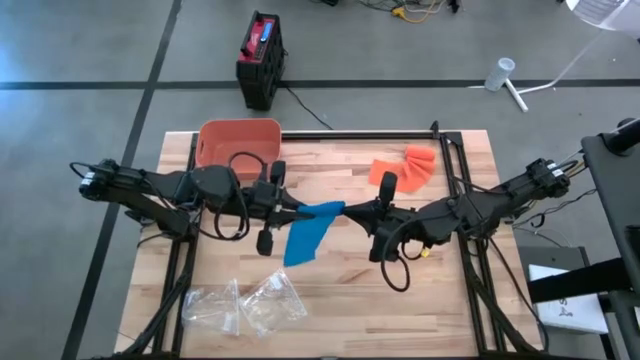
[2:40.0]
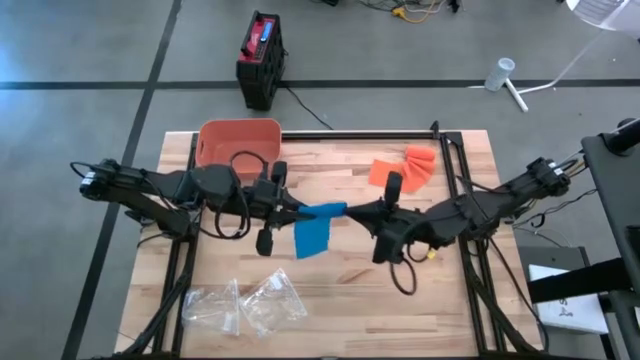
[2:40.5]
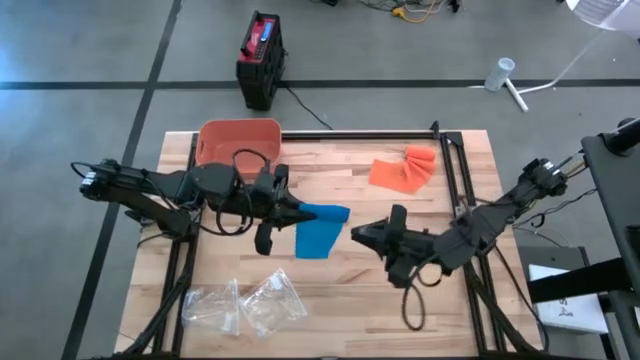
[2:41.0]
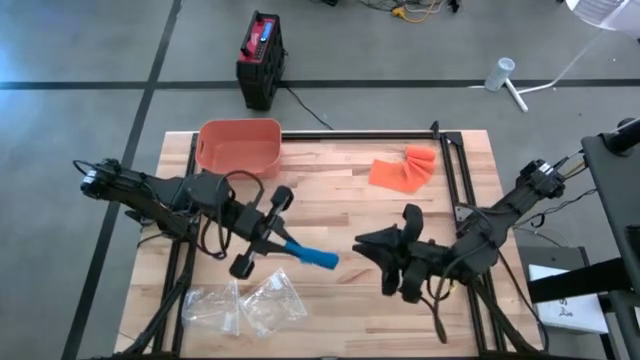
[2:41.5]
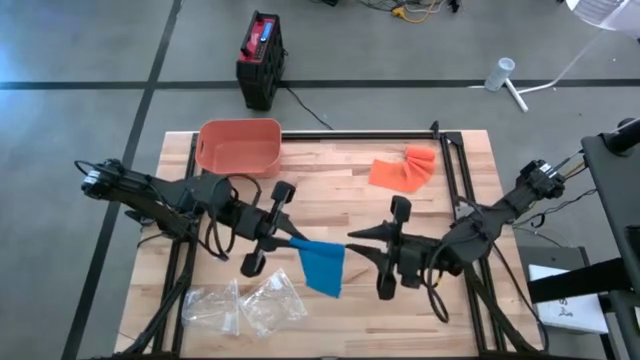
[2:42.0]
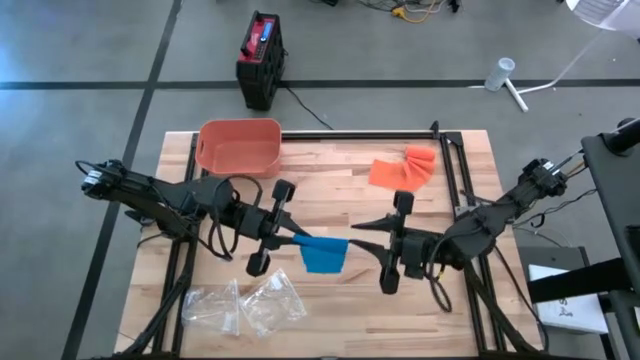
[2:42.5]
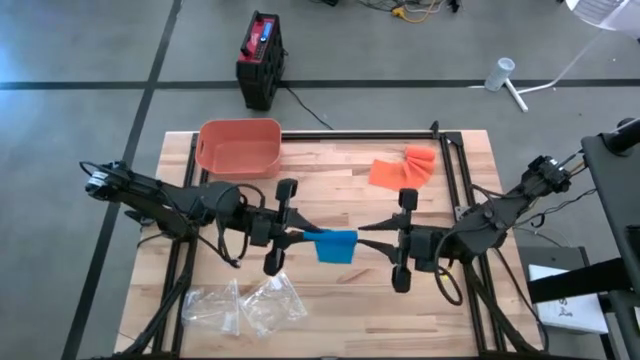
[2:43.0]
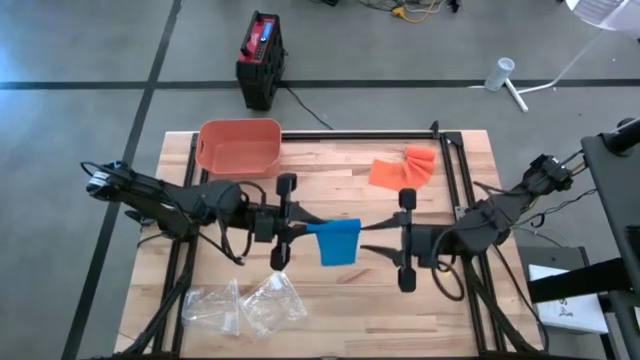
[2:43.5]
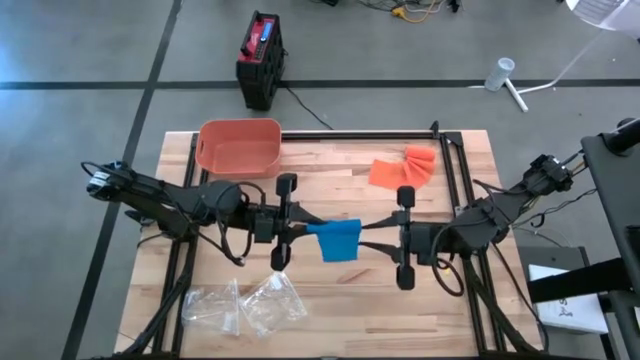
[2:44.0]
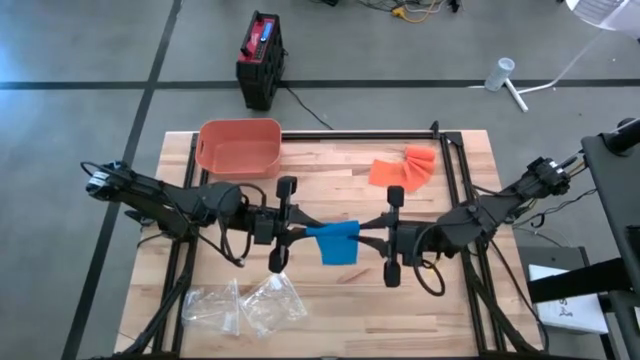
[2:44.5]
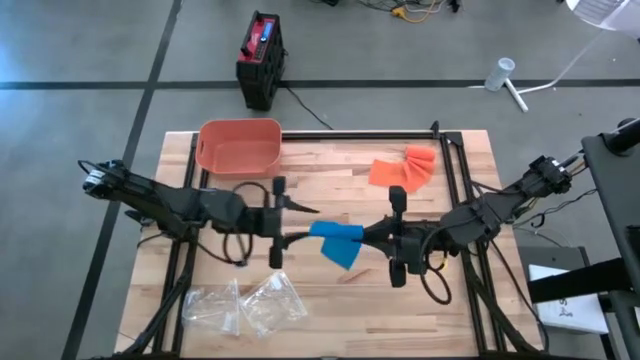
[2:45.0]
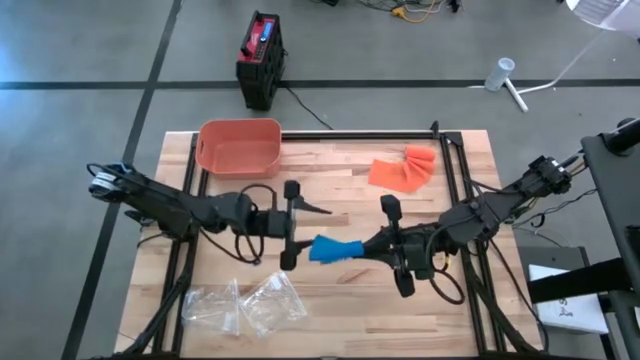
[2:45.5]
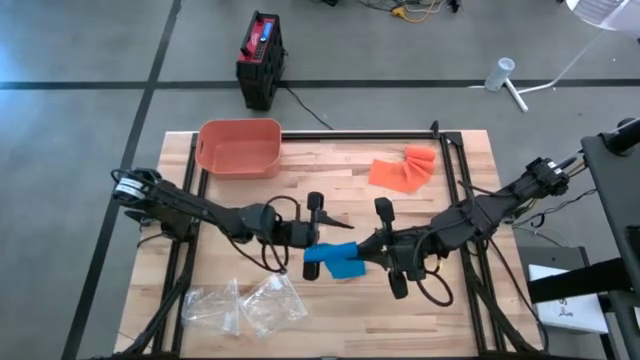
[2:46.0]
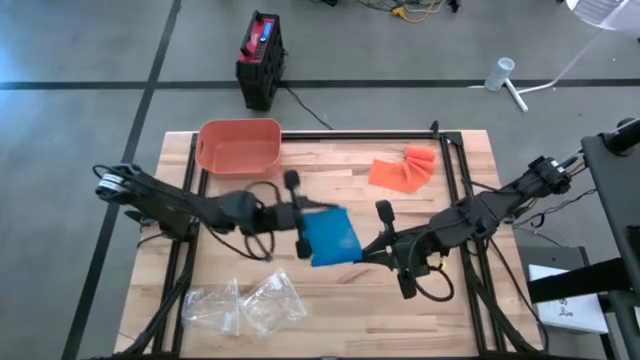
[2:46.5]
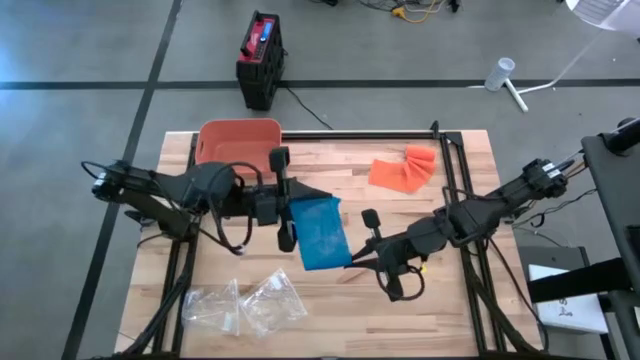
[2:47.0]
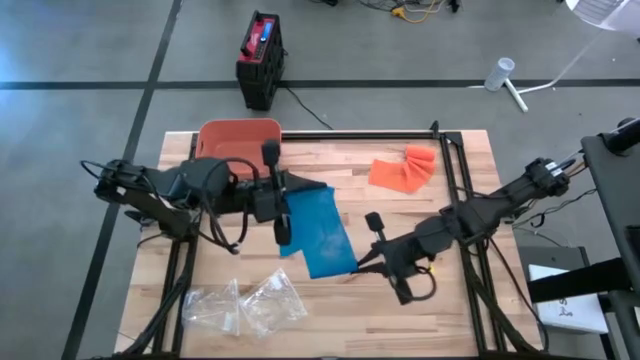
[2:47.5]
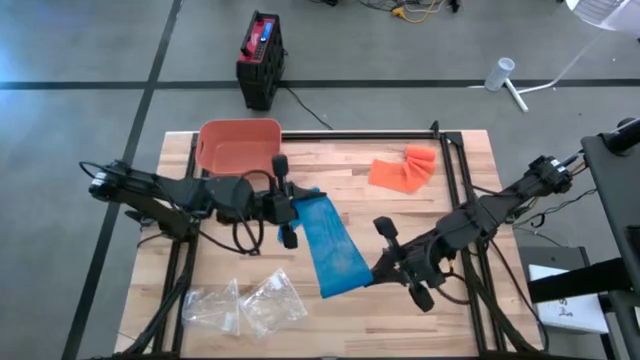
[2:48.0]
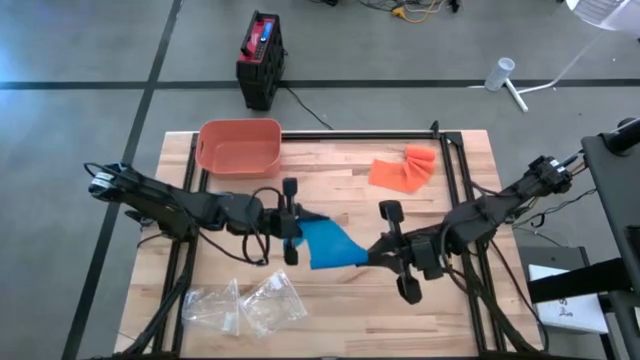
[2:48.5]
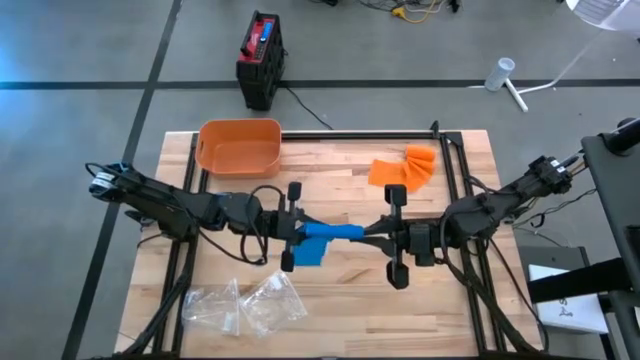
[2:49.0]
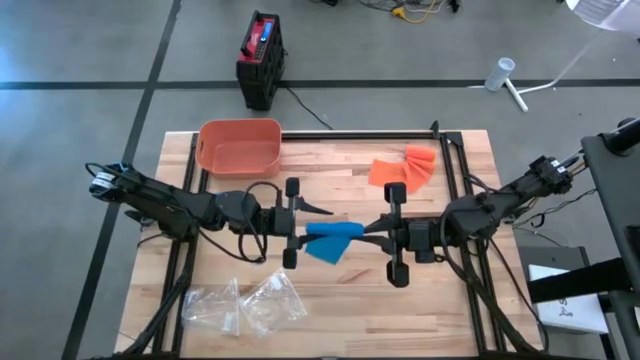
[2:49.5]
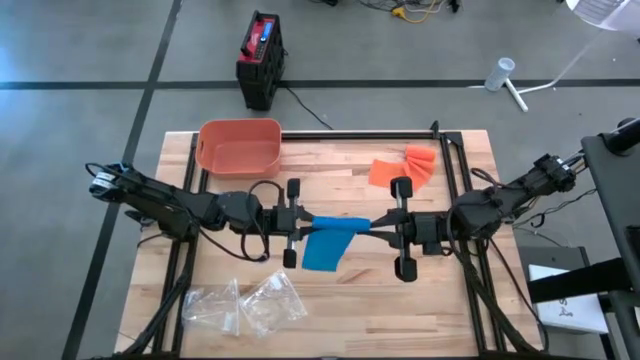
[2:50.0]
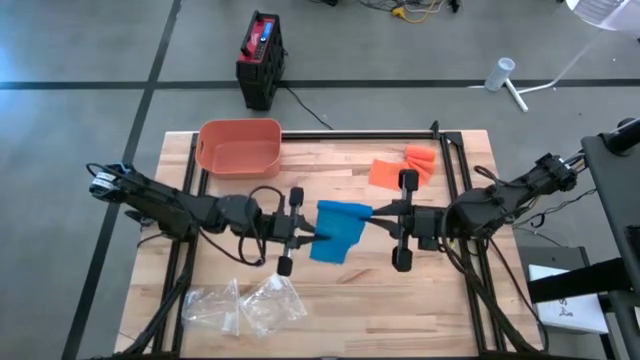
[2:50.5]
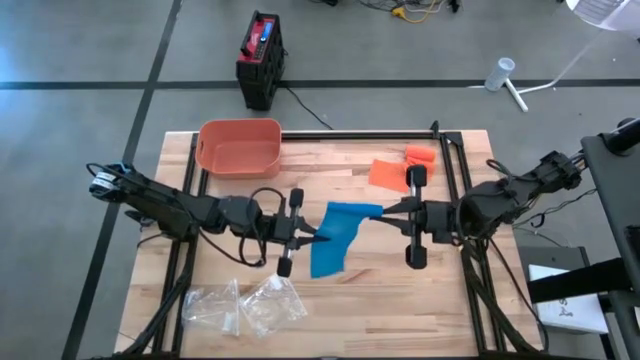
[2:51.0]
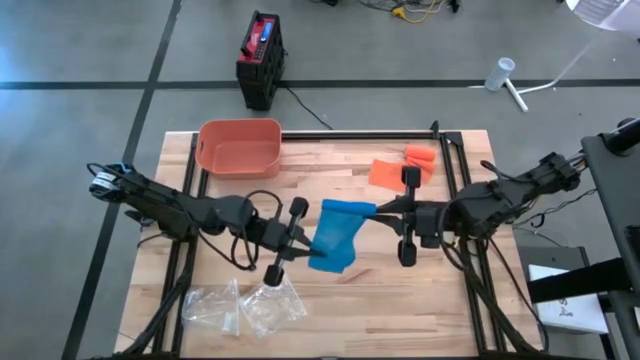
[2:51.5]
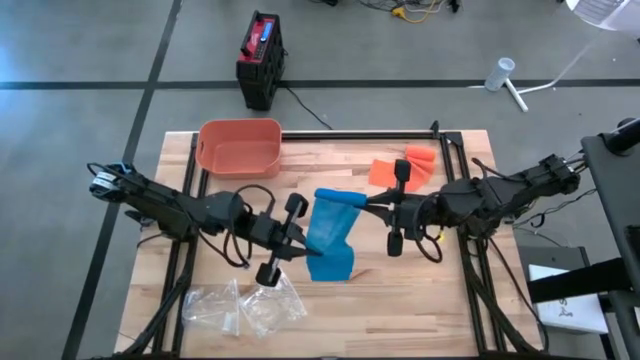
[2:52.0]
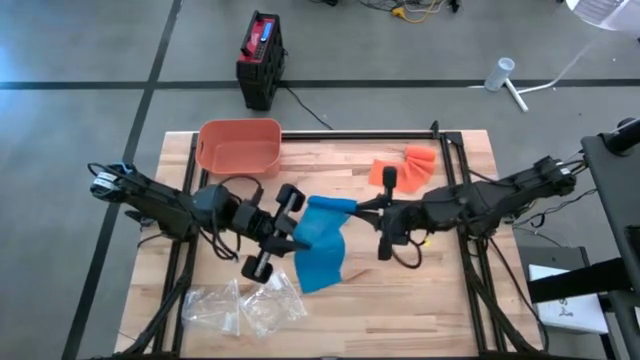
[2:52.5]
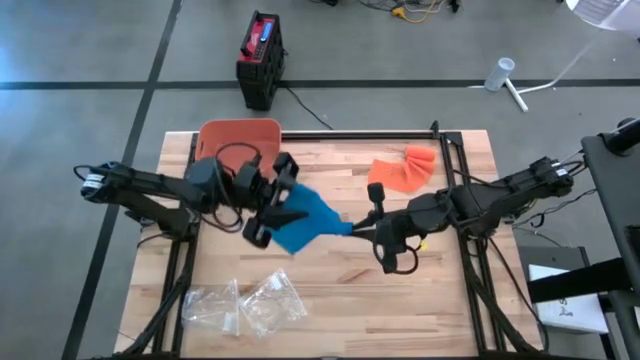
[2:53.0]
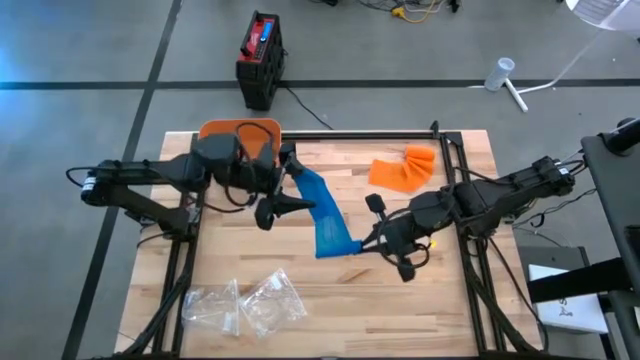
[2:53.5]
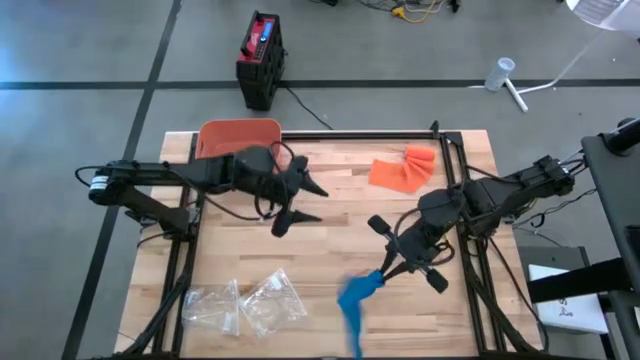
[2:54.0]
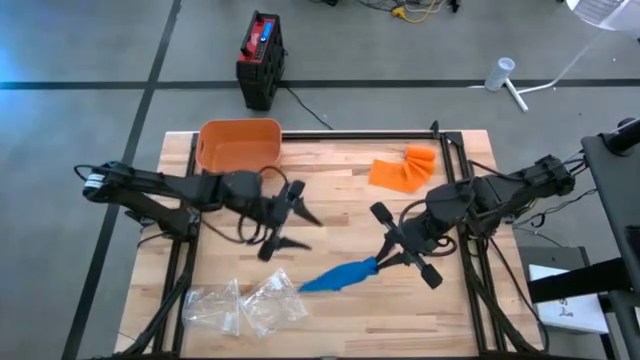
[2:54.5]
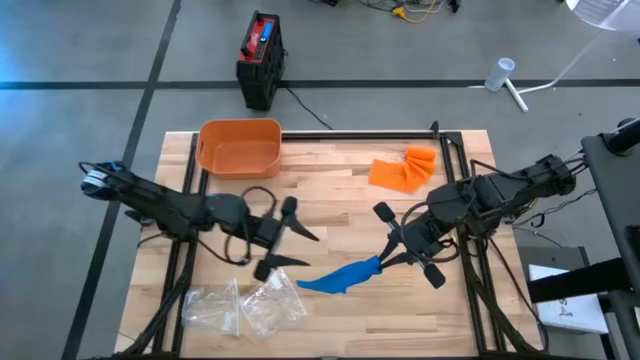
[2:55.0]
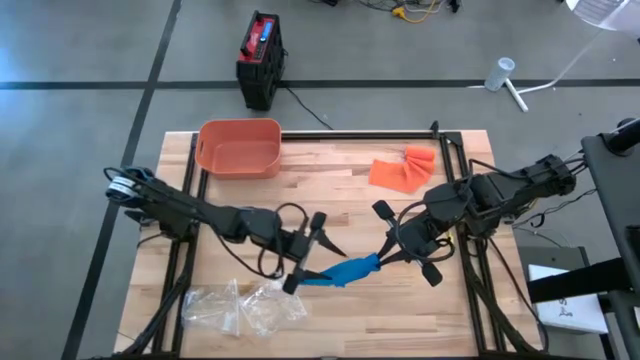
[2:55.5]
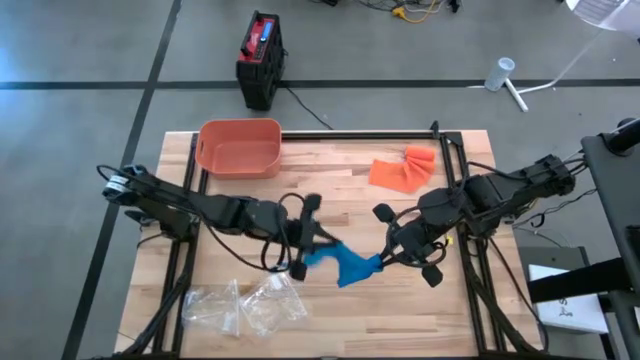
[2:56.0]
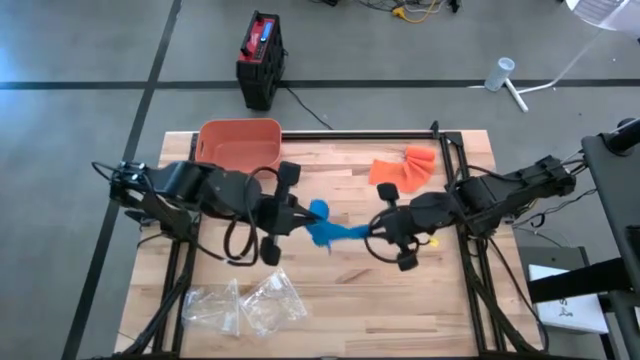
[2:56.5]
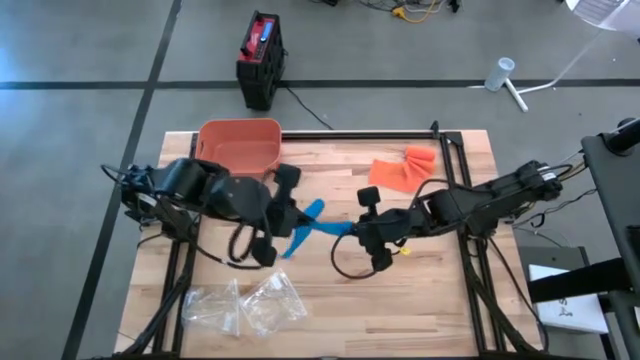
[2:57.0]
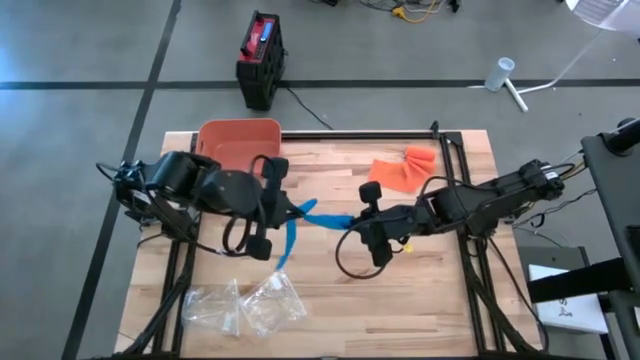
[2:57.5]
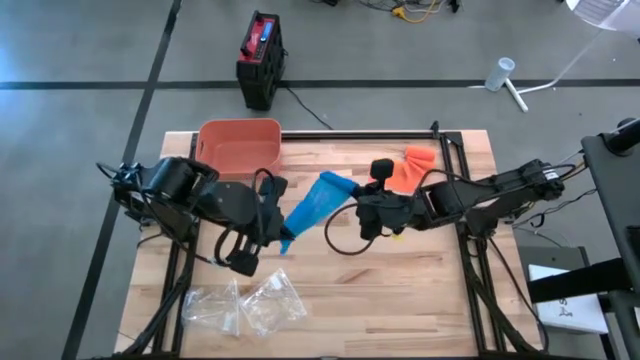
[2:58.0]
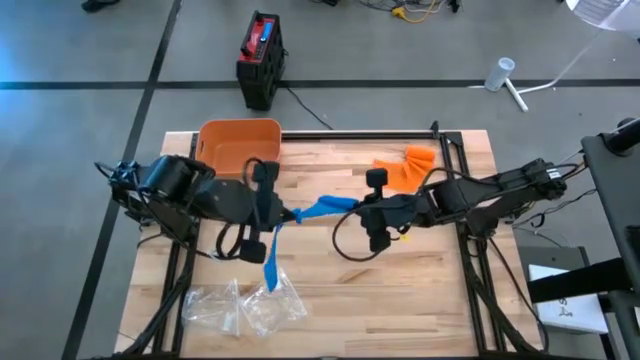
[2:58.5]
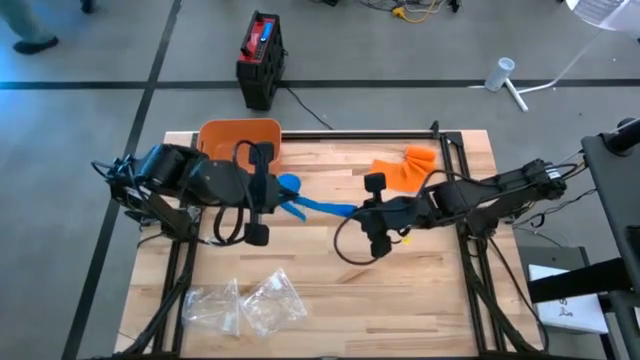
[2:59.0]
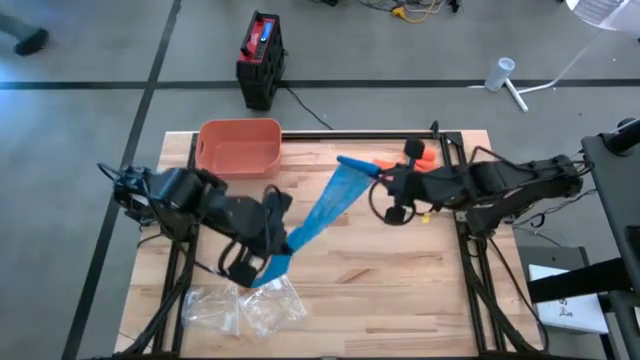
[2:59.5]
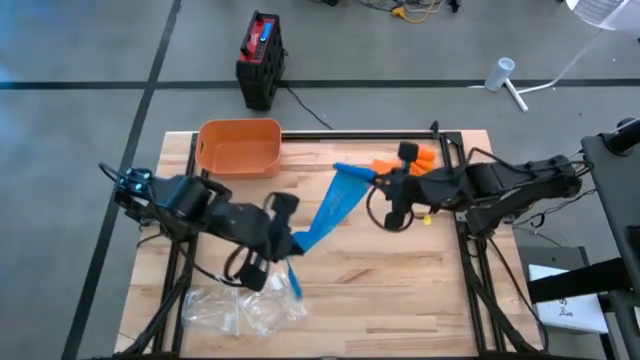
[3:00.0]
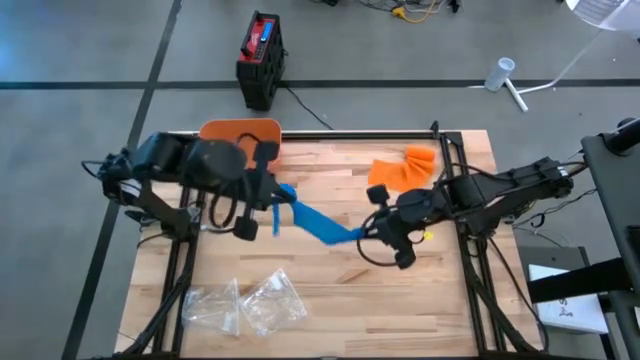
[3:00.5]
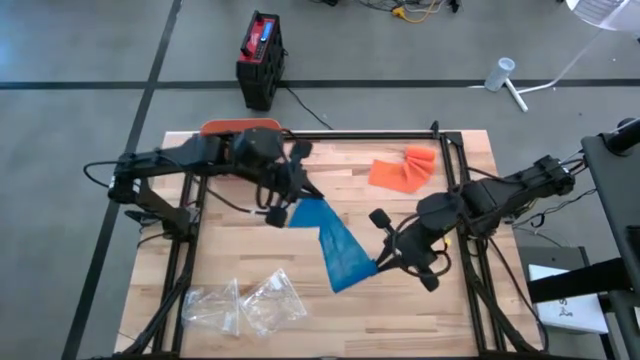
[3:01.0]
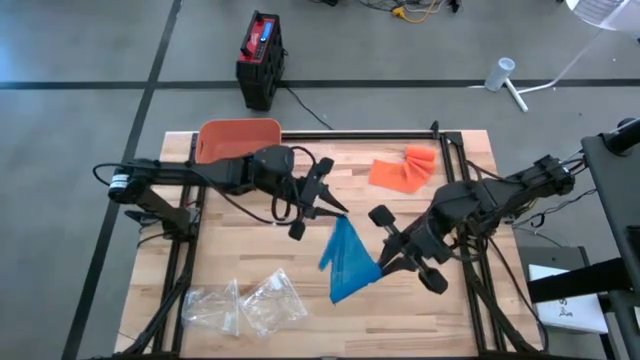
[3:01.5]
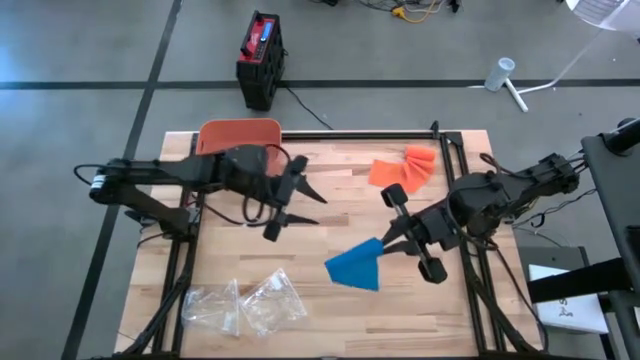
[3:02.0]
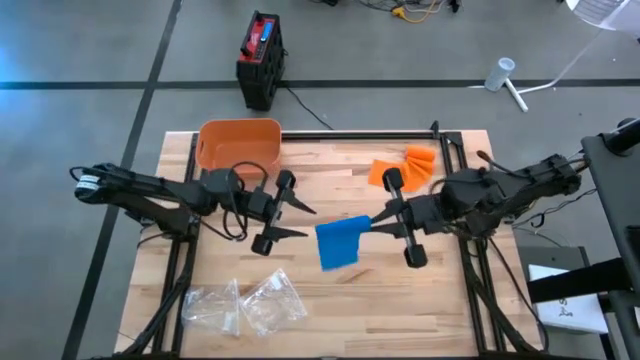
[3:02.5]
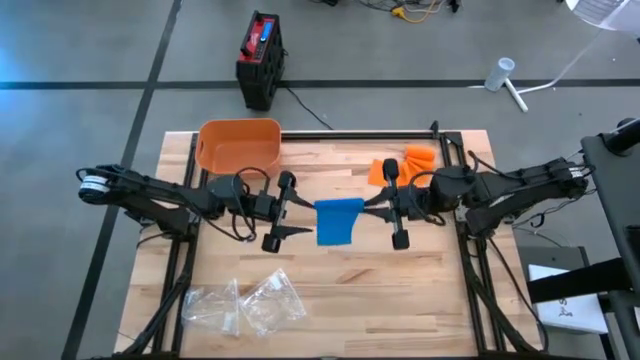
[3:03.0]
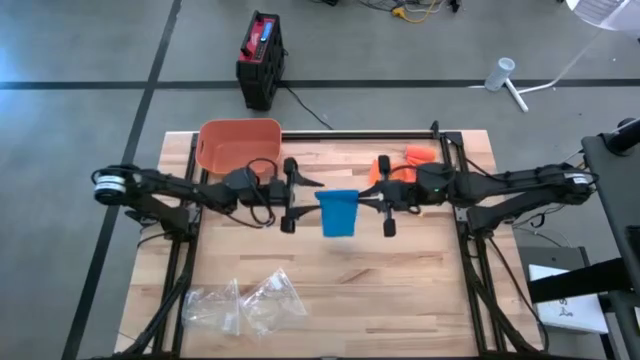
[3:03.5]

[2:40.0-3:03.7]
Task: Roll bandage
Roll the blue bandage
